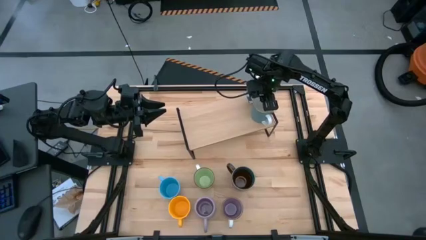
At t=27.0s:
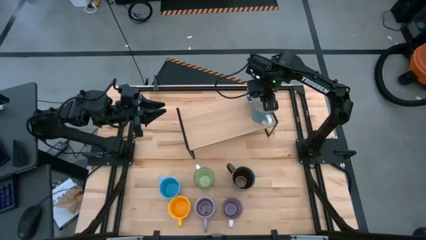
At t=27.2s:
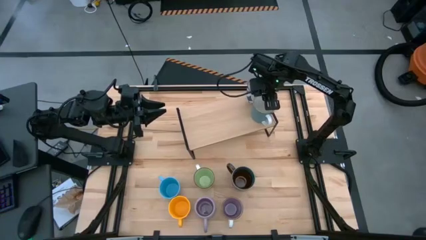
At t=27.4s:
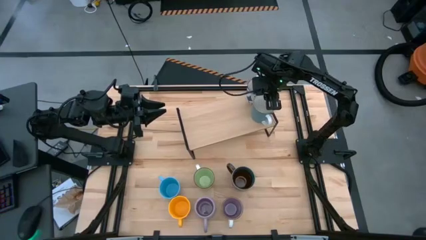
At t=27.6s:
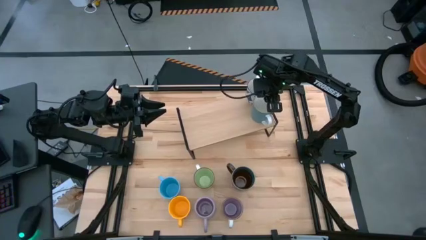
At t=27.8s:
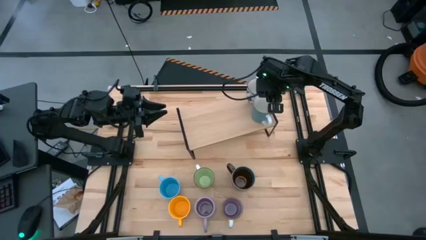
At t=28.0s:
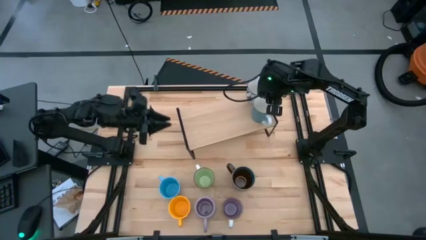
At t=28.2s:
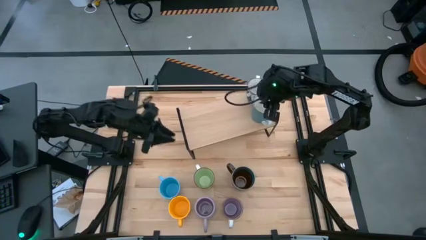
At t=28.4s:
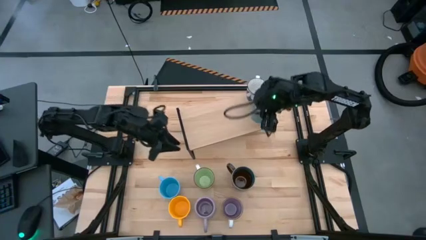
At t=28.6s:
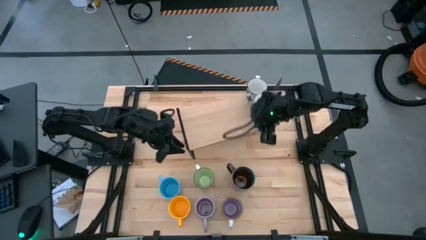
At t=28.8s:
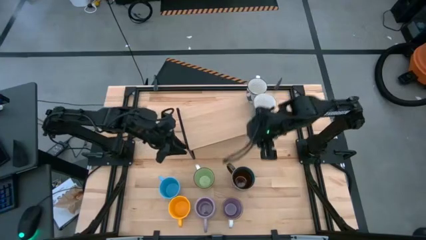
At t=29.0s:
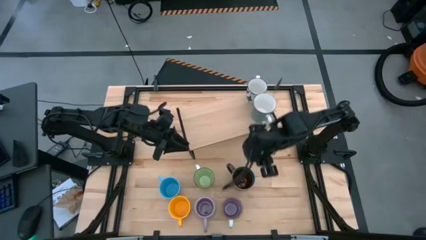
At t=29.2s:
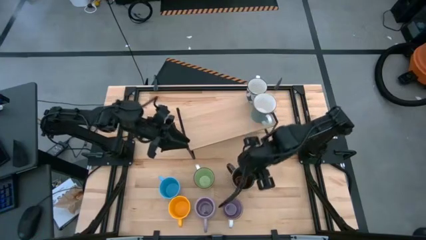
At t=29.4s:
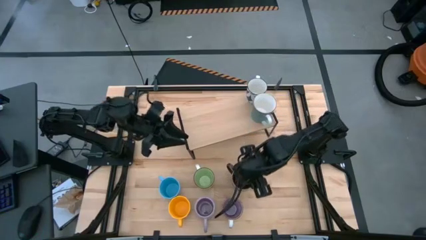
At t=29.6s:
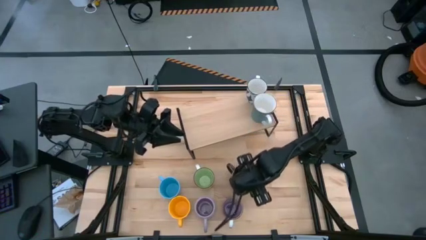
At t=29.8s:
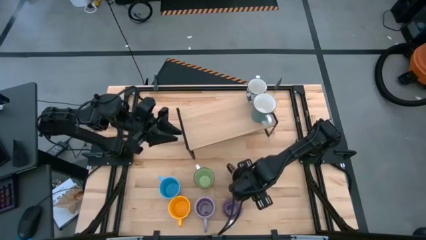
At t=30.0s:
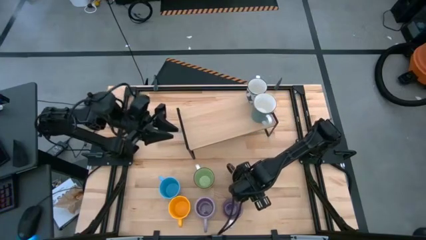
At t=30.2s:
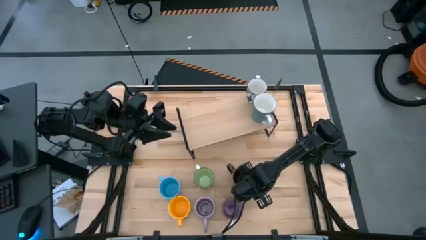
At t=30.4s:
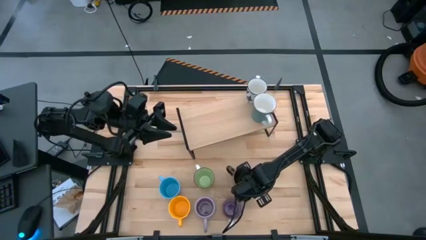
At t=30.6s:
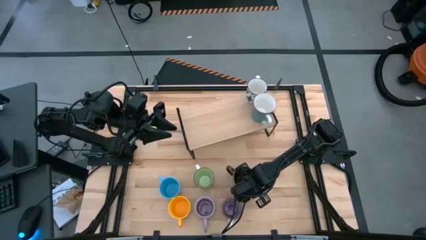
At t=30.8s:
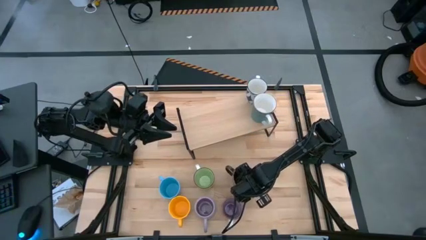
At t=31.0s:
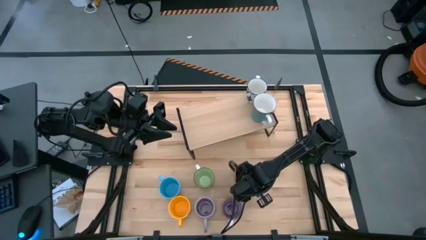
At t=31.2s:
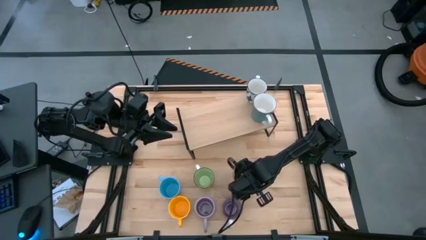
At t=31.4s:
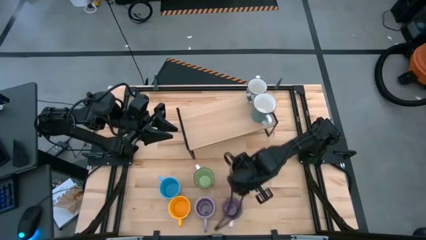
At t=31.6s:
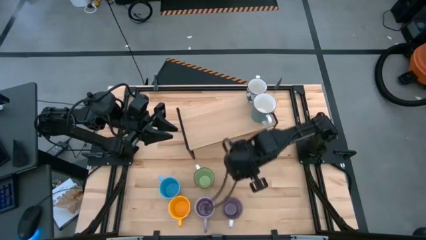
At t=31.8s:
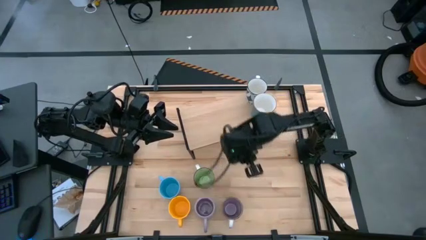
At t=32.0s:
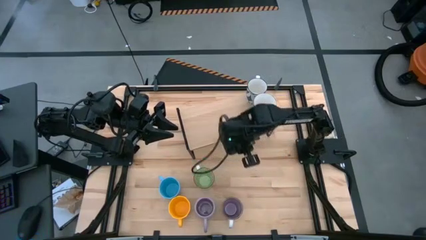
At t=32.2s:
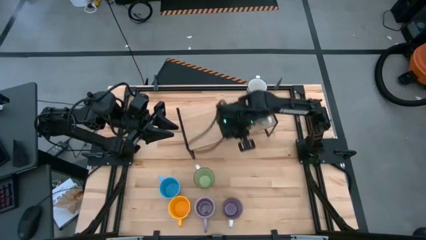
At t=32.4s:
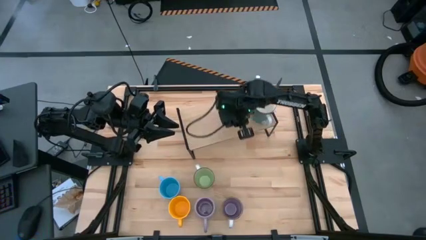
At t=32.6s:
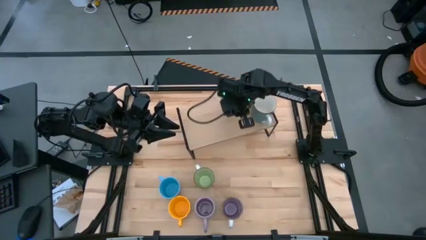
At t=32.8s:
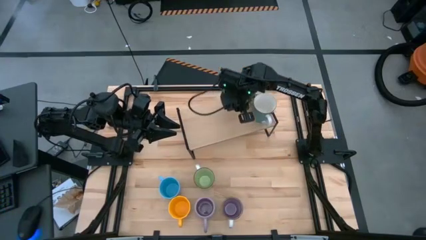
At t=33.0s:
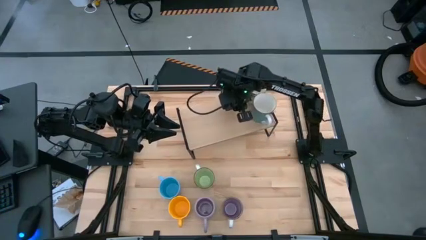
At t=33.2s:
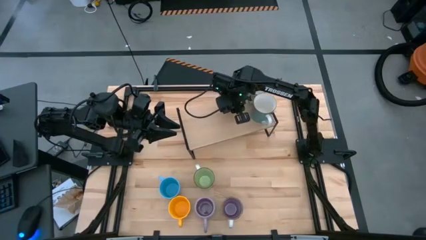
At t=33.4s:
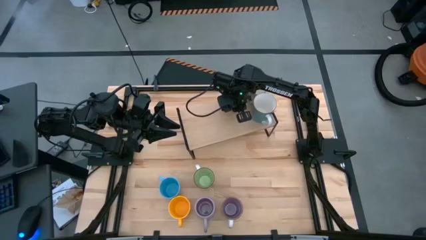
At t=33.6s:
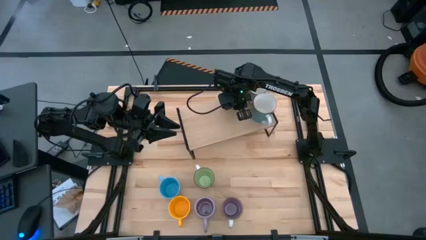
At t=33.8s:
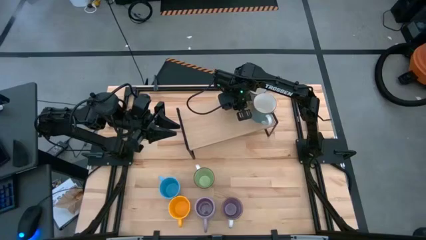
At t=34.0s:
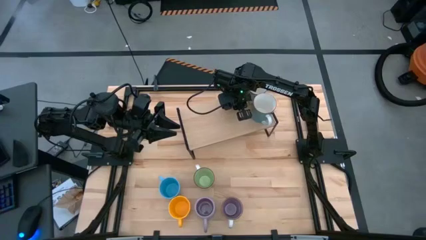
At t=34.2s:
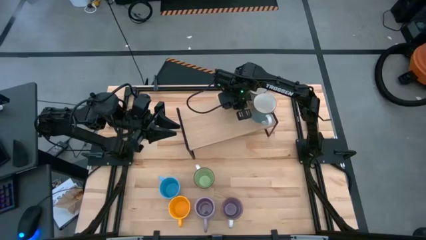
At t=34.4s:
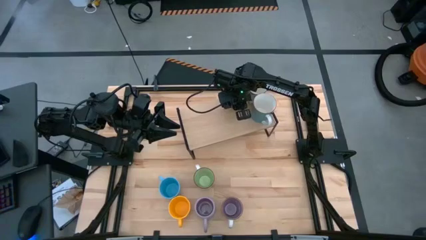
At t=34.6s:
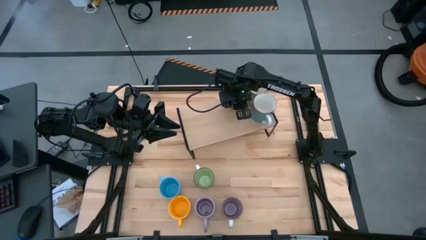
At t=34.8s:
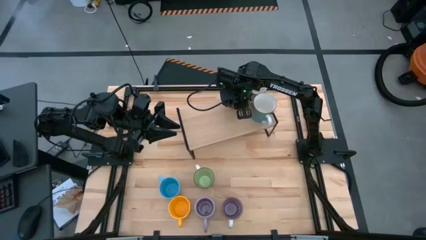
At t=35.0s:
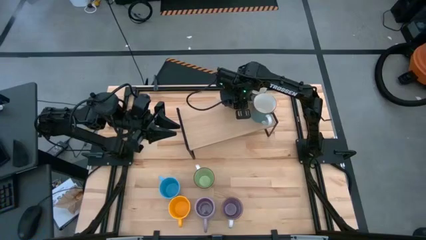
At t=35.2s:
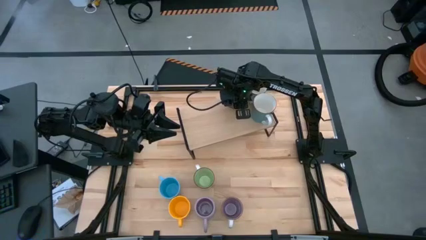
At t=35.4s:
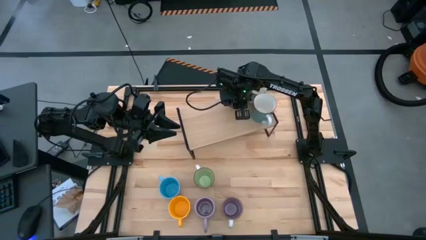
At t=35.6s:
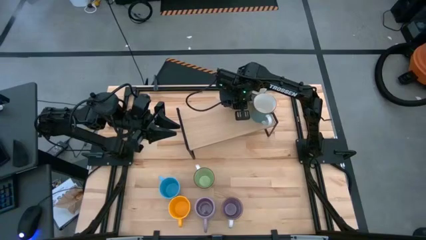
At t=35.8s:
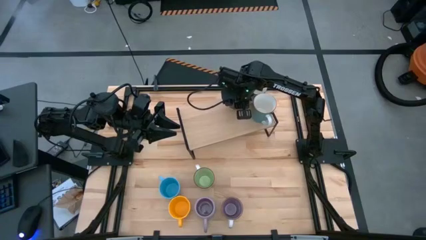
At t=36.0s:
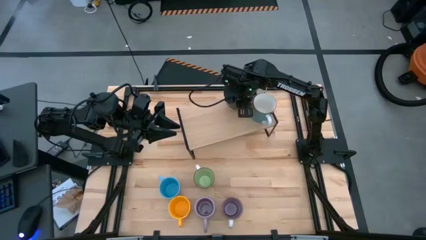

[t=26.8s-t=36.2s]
Task: Place coffee mugs
Put the blue-brown mug on the shelf
